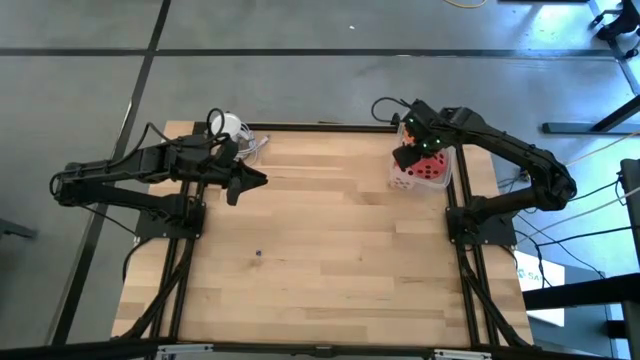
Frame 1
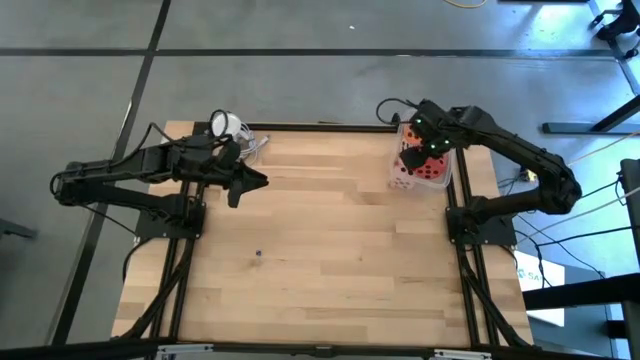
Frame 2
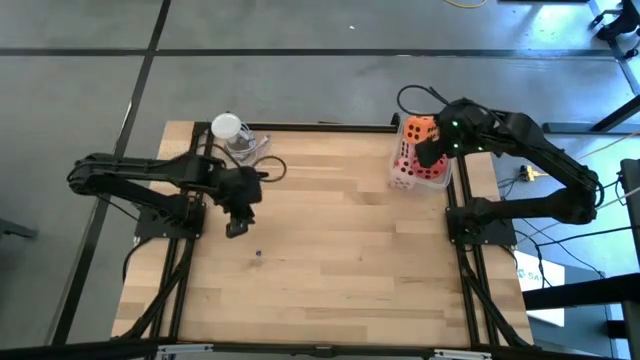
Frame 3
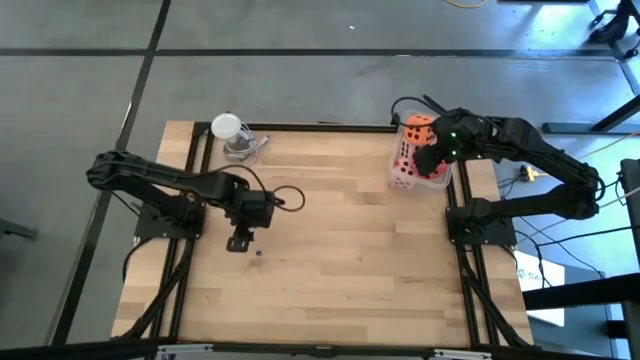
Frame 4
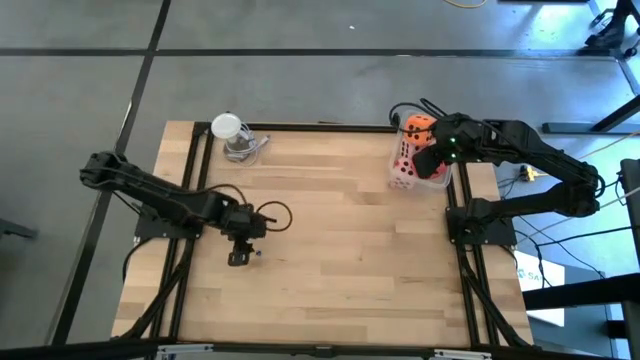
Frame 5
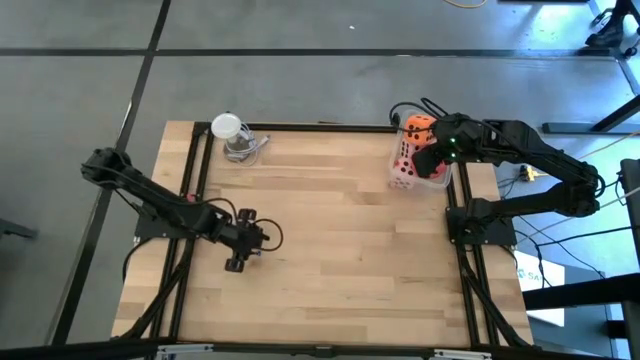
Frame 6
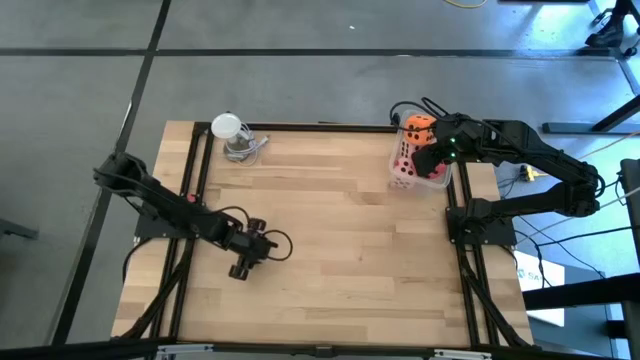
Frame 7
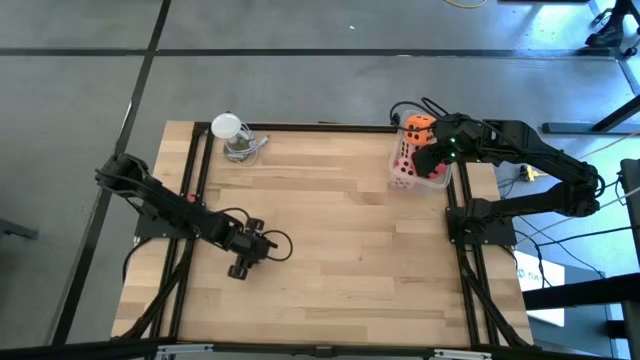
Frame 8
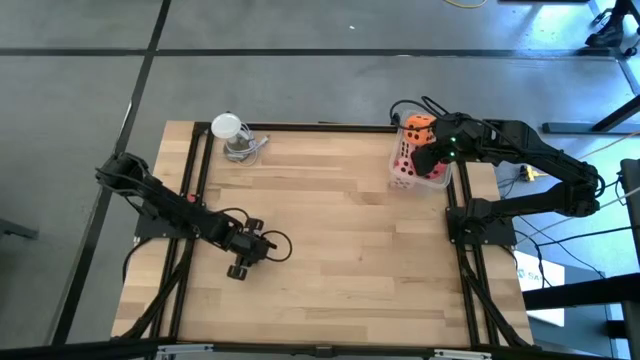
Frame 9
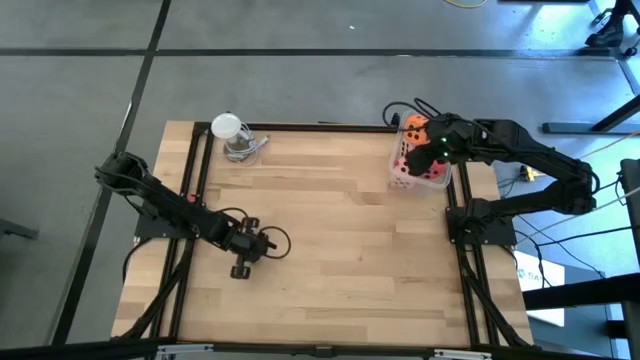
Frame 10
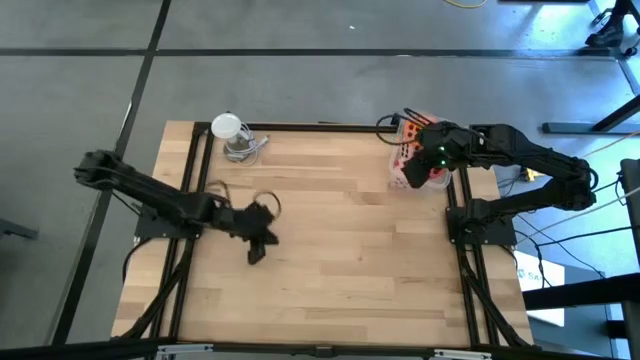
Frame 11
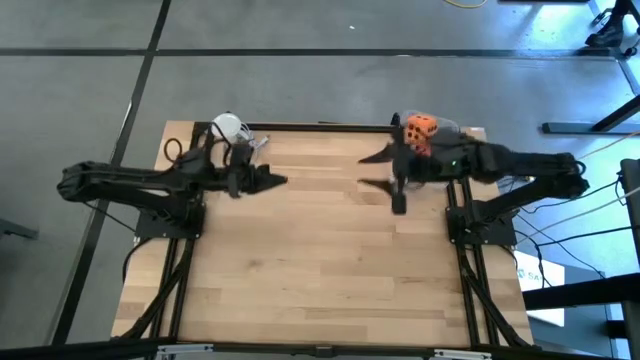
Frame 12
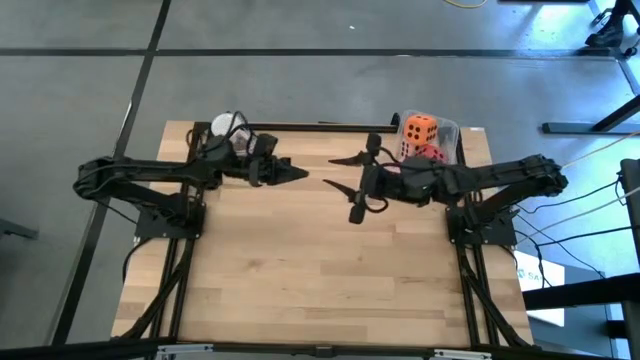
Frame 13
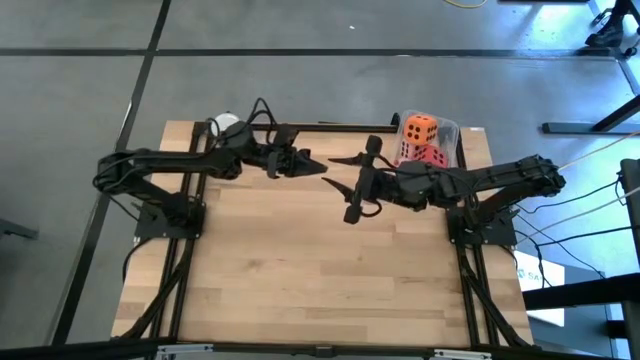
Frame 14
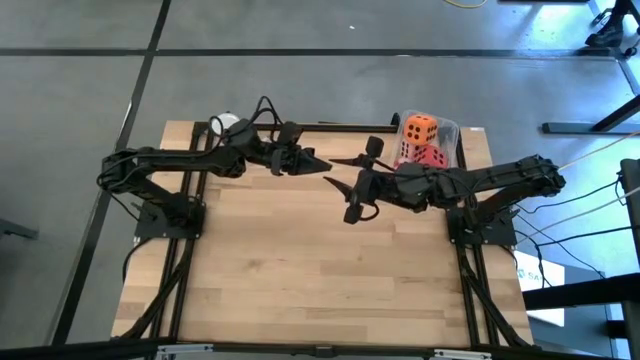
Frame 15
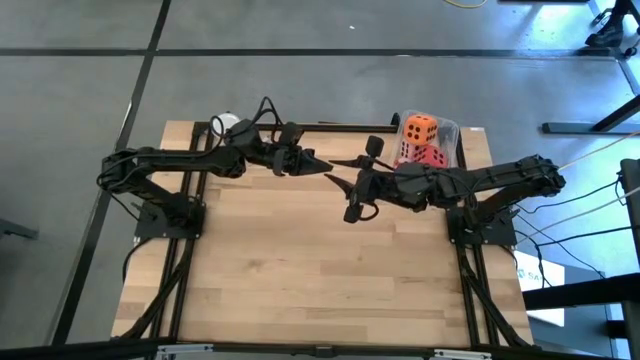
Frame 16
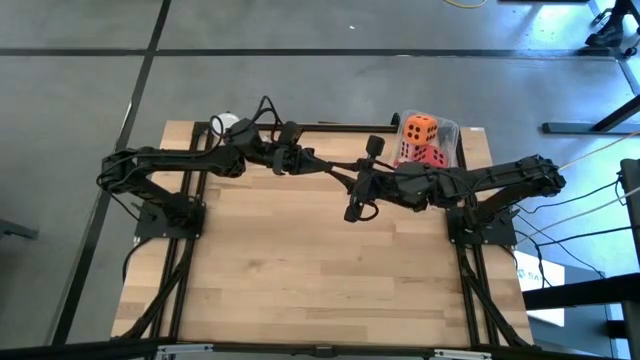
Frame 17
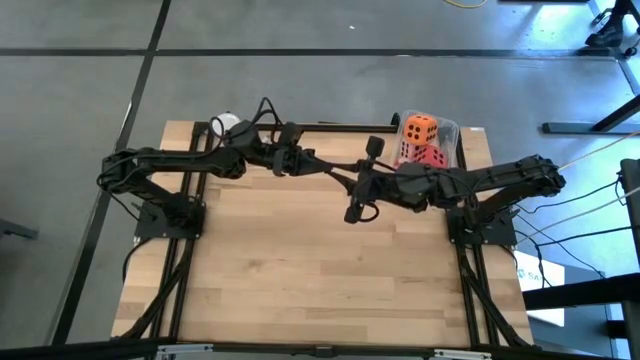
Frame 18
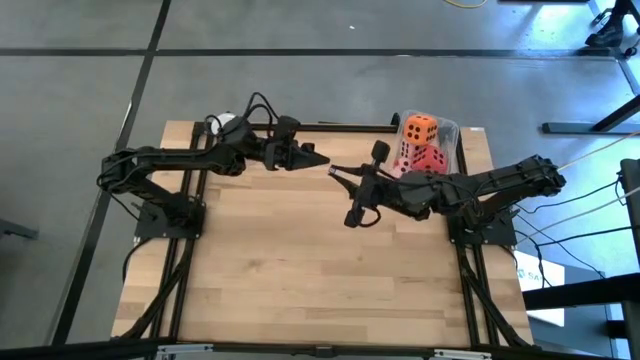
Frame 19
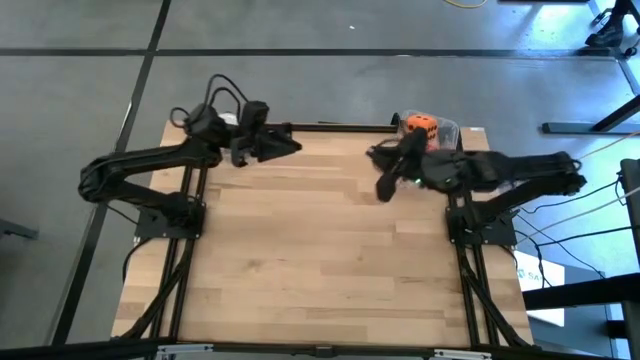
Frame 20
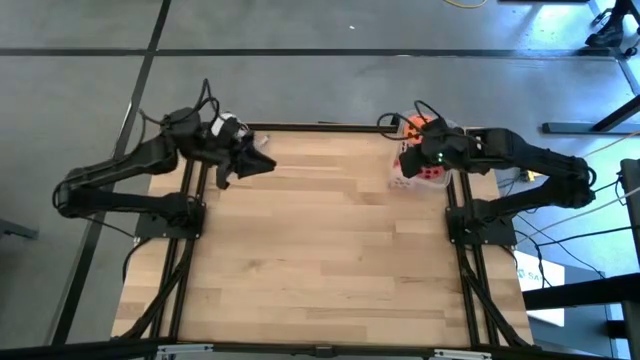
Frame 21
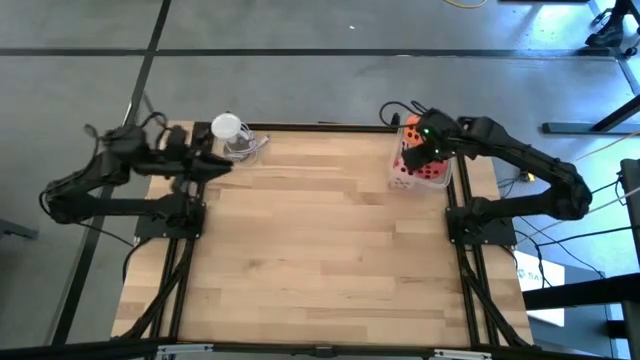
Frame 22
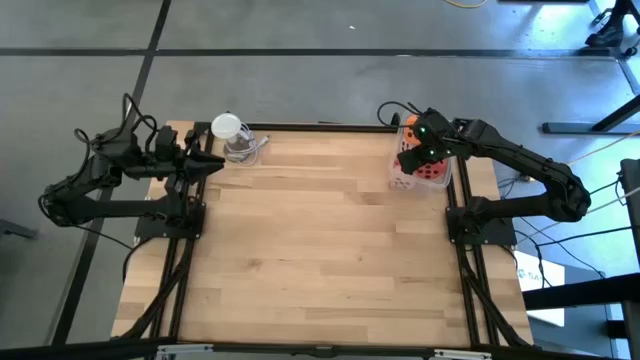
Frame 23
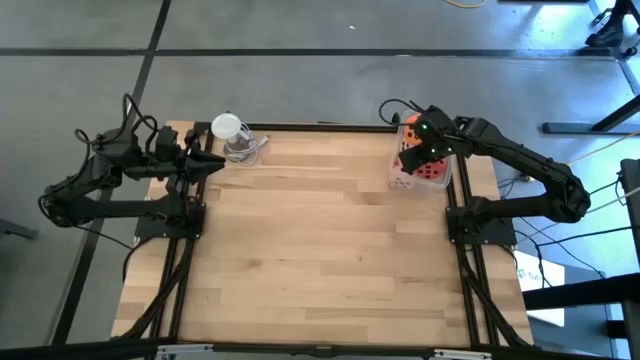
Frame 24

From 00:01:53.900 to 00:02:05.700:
Task: Pick & Place Dice
Put the small blue die into the container

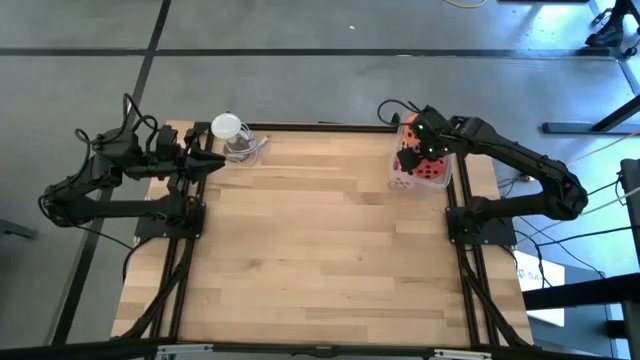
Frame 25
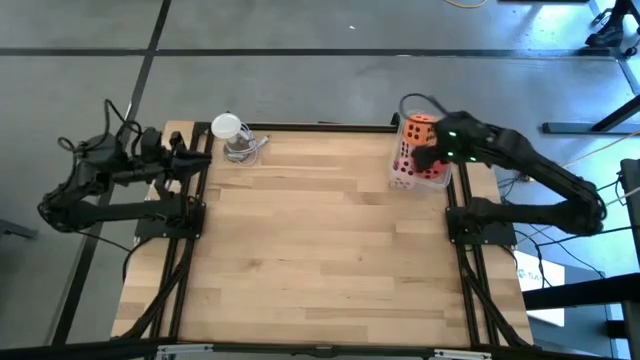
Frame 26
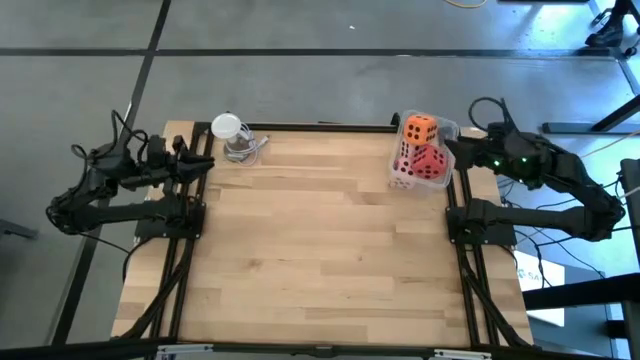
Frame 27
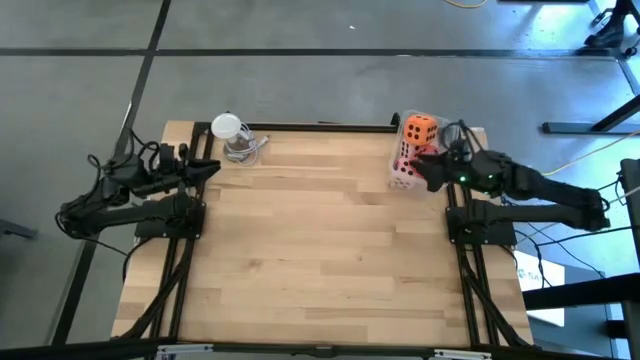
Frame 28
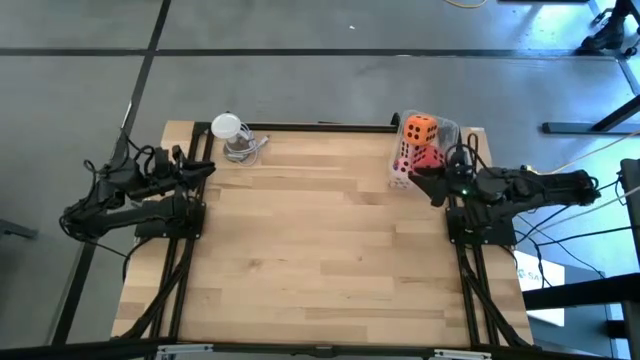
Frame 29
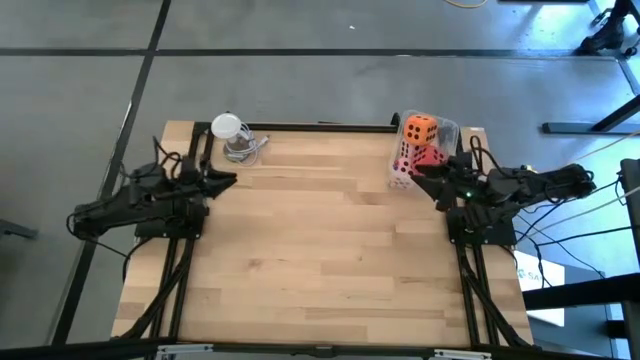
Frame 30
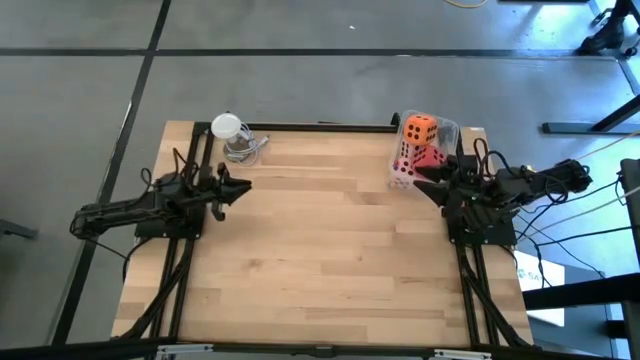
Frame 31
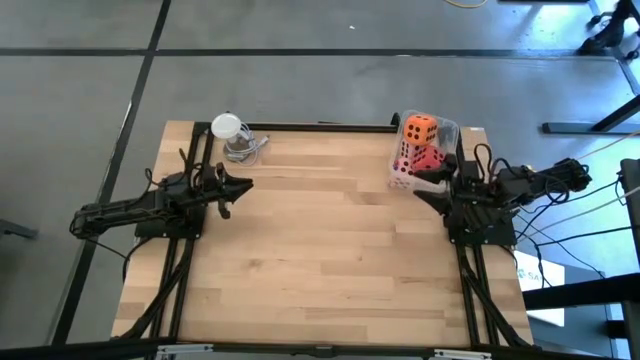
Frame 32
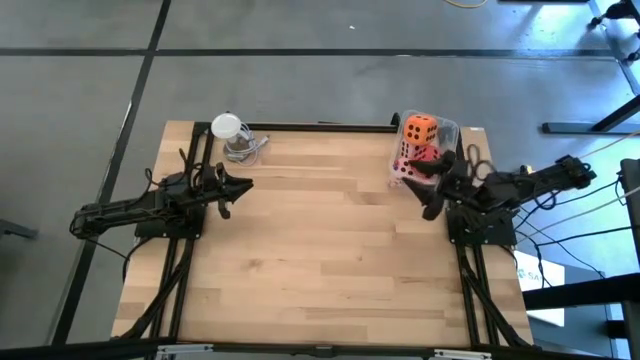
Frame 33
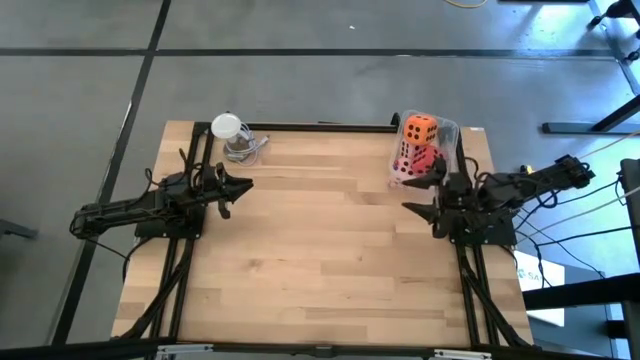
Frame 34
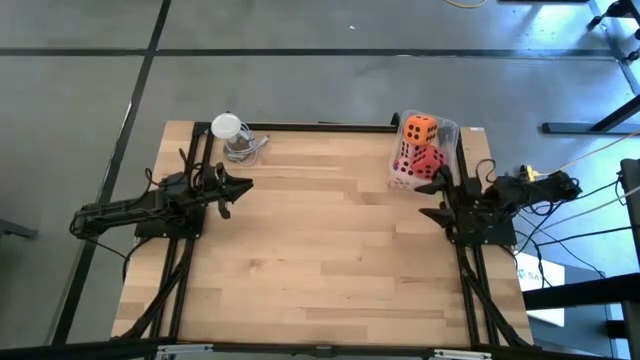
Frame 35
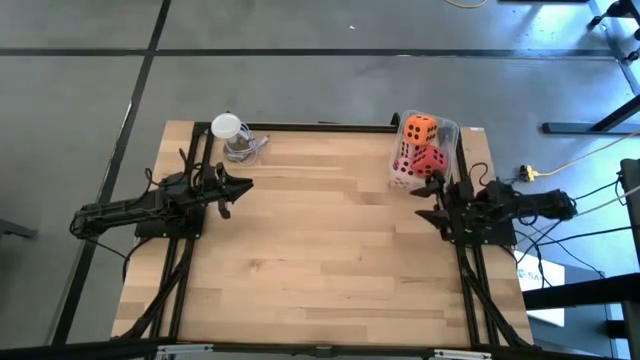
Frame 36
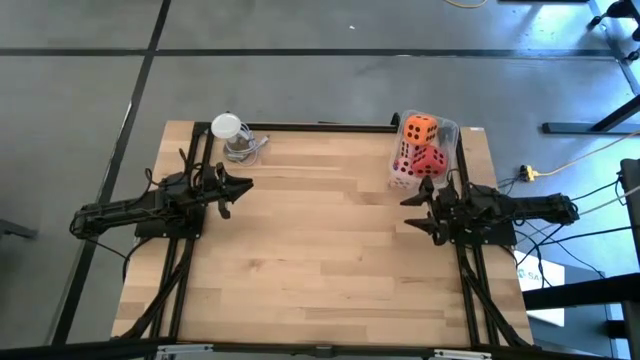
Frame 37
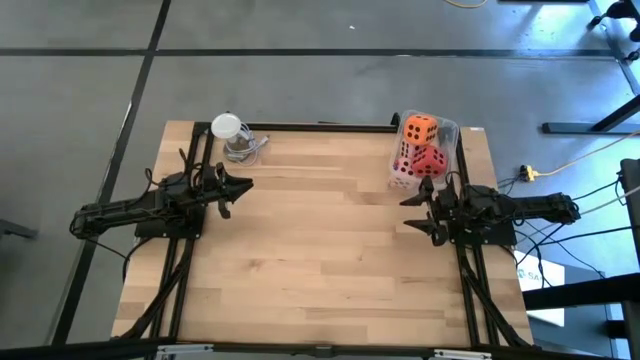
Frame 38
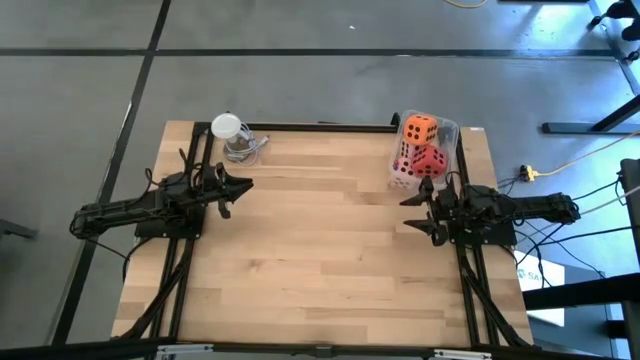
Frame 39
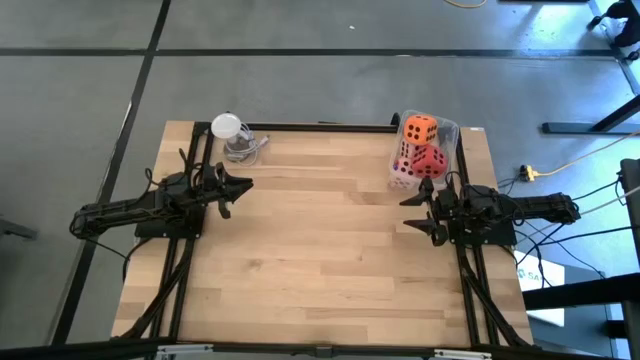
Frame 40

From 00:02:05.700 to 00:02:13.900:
Return to Home Position
